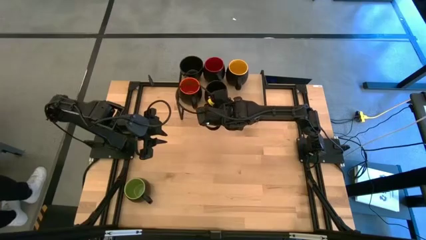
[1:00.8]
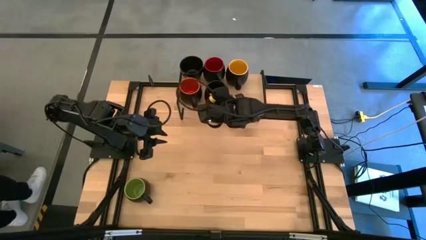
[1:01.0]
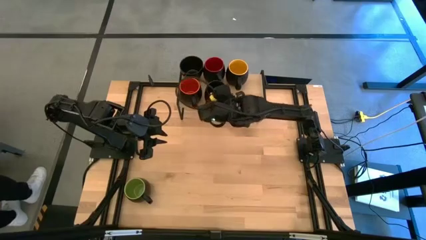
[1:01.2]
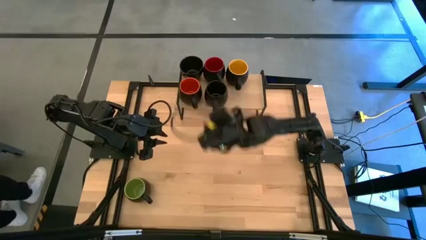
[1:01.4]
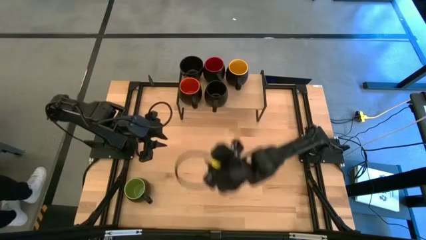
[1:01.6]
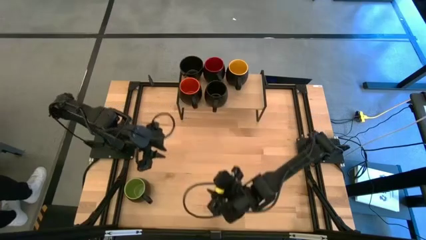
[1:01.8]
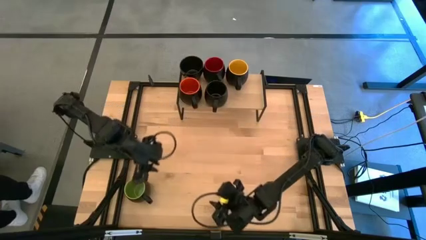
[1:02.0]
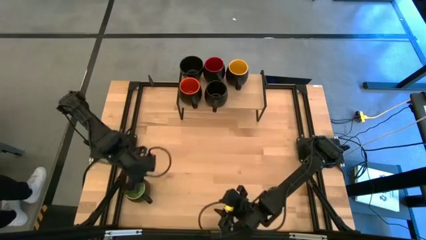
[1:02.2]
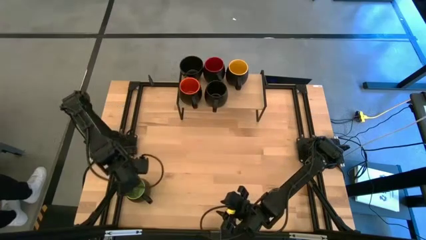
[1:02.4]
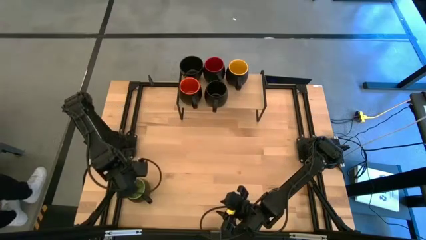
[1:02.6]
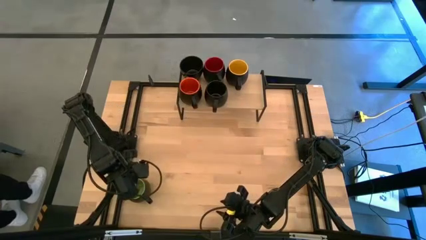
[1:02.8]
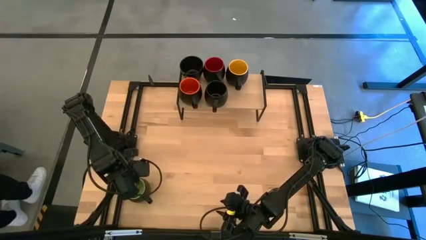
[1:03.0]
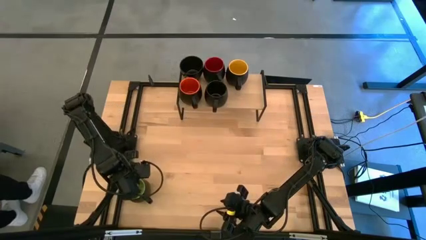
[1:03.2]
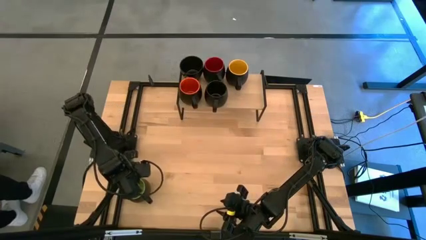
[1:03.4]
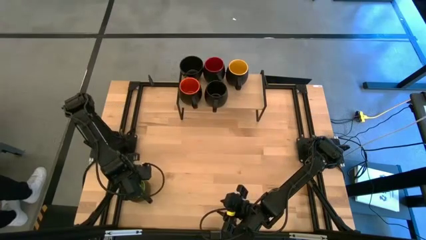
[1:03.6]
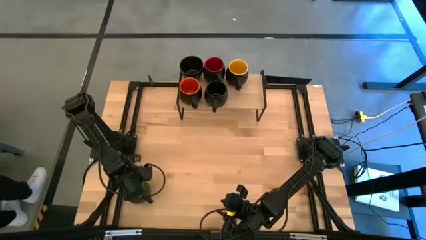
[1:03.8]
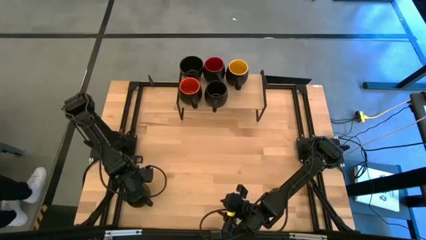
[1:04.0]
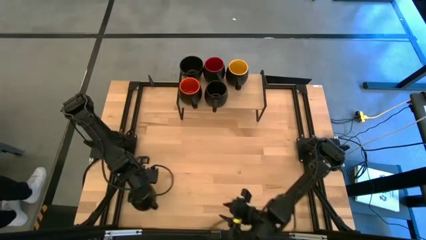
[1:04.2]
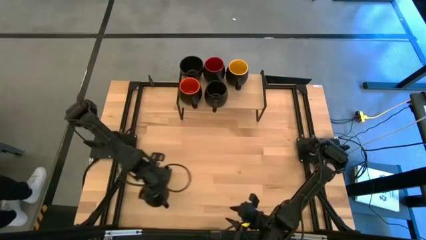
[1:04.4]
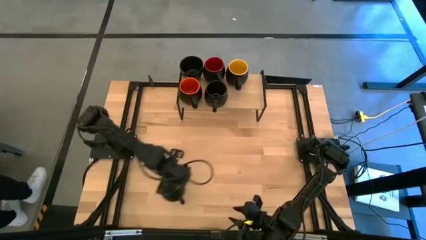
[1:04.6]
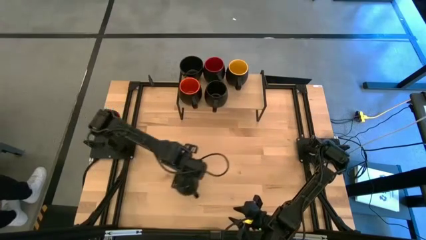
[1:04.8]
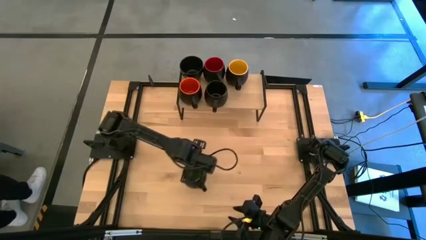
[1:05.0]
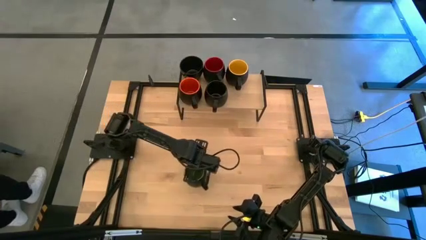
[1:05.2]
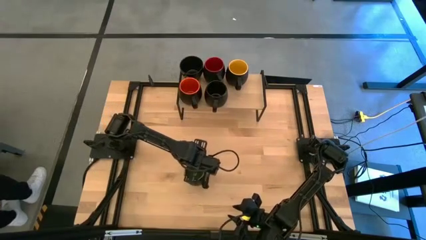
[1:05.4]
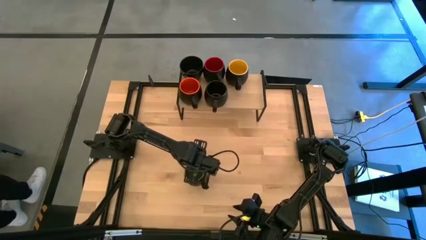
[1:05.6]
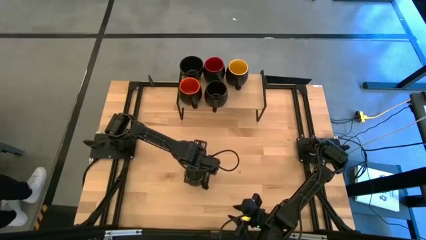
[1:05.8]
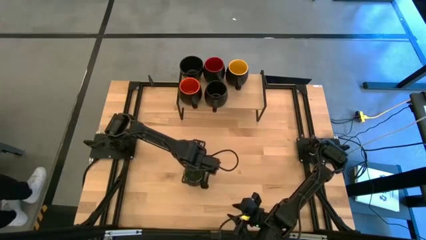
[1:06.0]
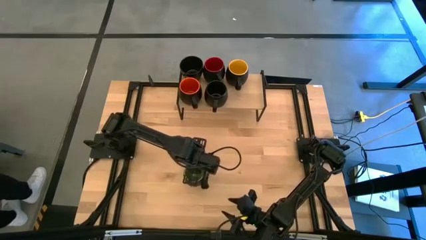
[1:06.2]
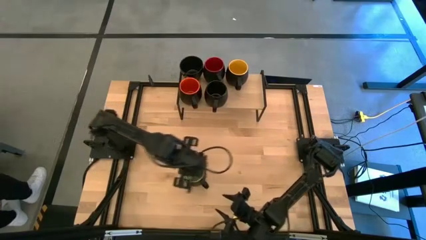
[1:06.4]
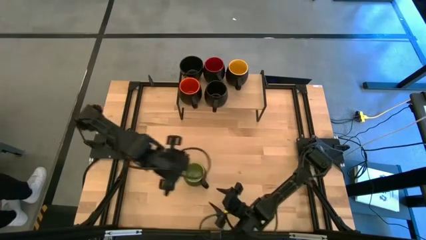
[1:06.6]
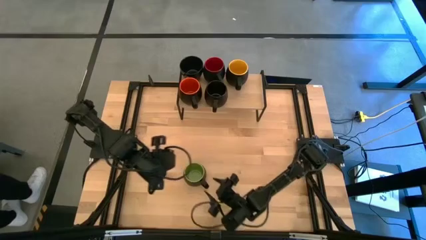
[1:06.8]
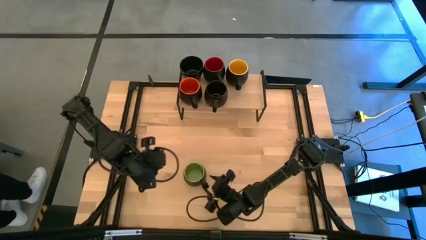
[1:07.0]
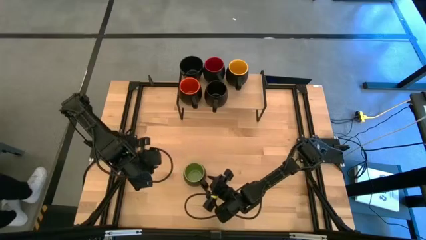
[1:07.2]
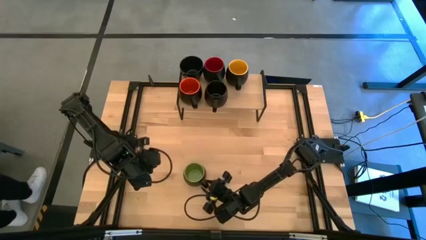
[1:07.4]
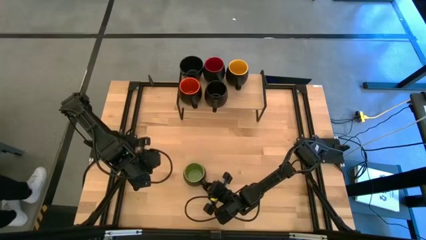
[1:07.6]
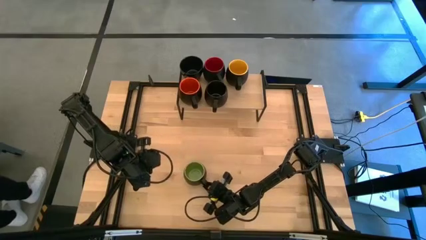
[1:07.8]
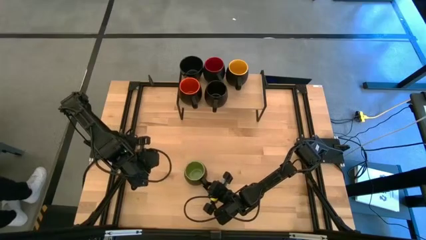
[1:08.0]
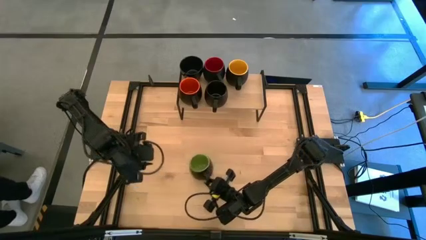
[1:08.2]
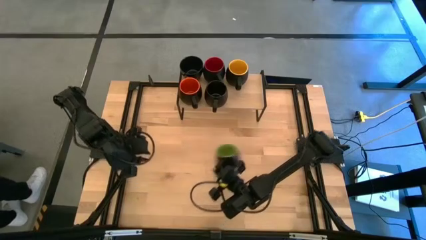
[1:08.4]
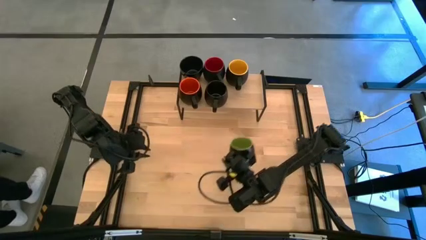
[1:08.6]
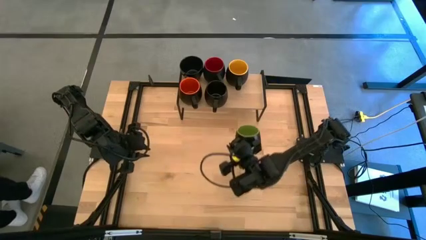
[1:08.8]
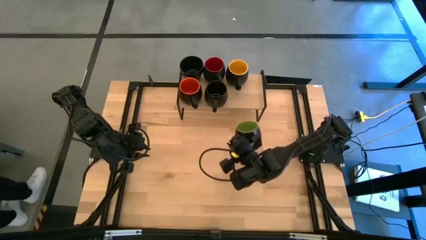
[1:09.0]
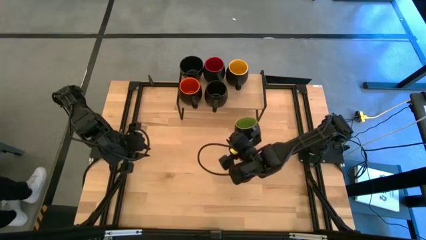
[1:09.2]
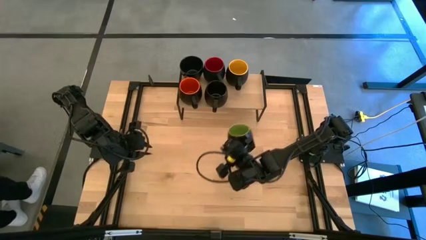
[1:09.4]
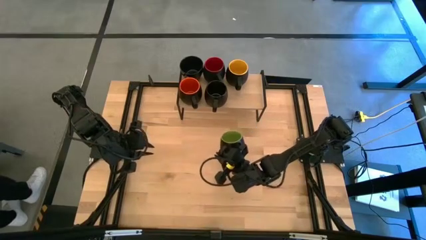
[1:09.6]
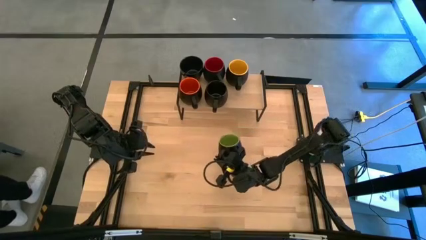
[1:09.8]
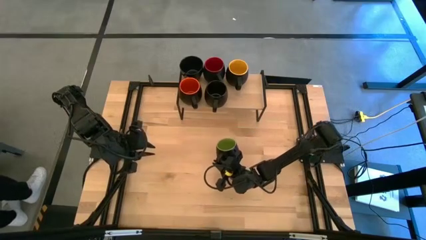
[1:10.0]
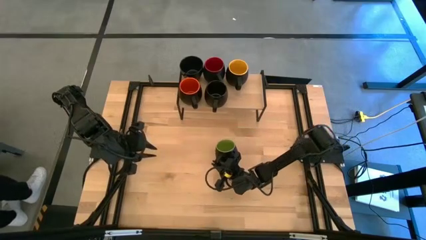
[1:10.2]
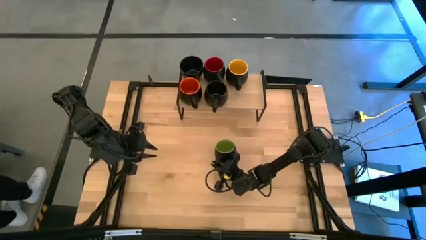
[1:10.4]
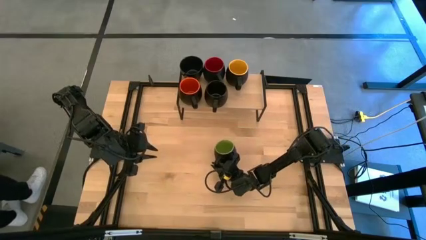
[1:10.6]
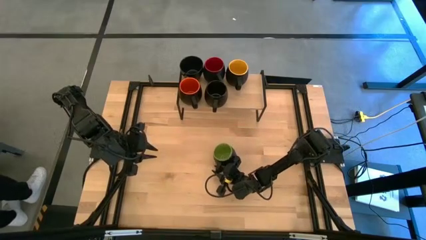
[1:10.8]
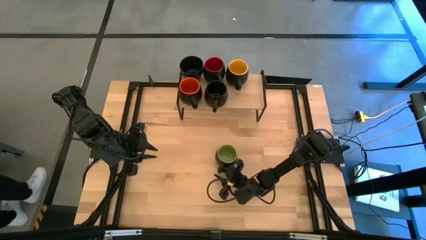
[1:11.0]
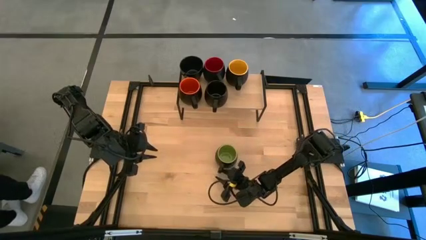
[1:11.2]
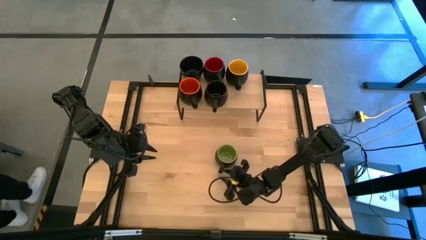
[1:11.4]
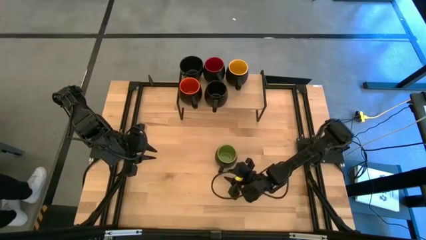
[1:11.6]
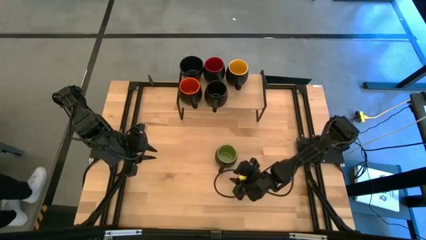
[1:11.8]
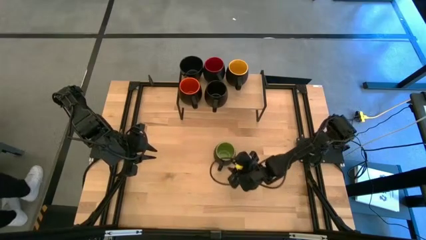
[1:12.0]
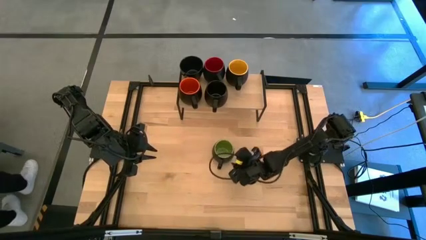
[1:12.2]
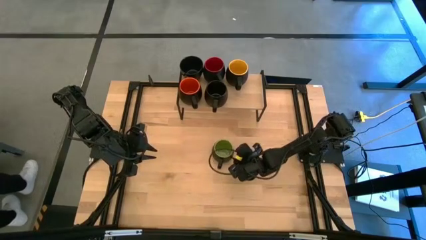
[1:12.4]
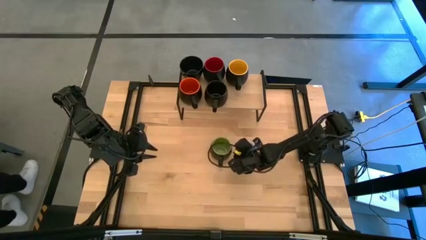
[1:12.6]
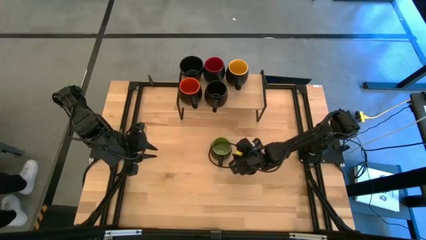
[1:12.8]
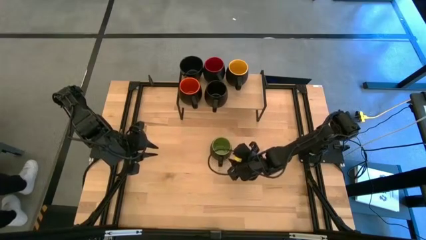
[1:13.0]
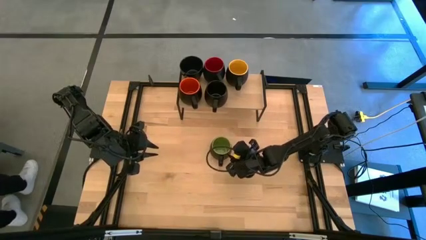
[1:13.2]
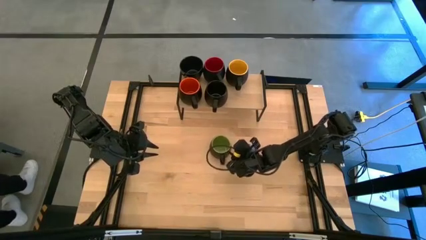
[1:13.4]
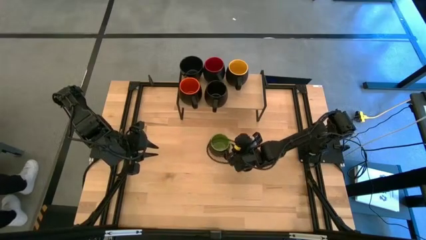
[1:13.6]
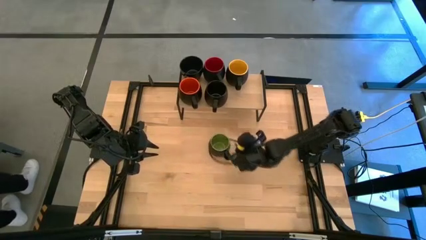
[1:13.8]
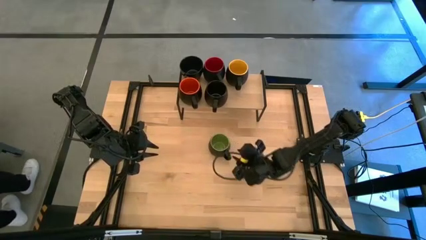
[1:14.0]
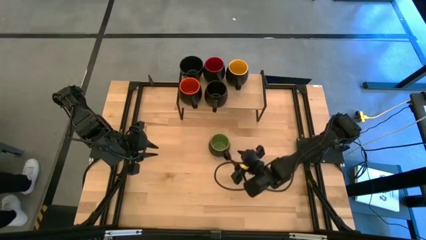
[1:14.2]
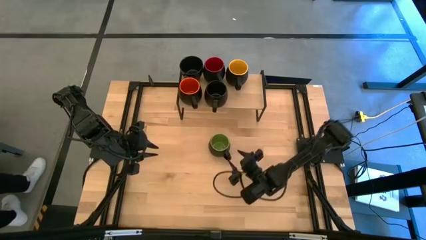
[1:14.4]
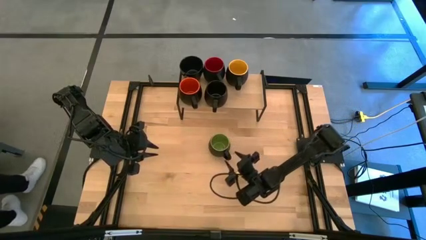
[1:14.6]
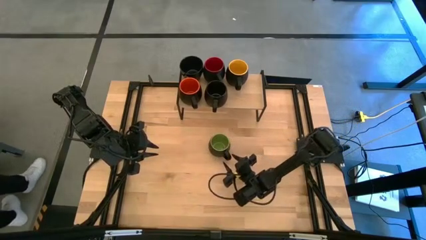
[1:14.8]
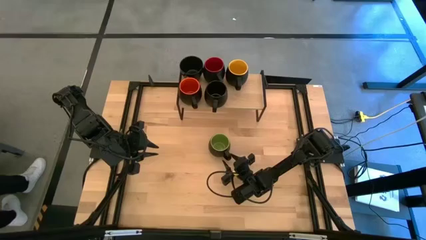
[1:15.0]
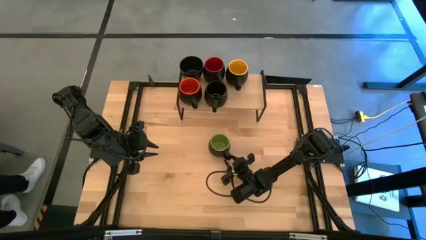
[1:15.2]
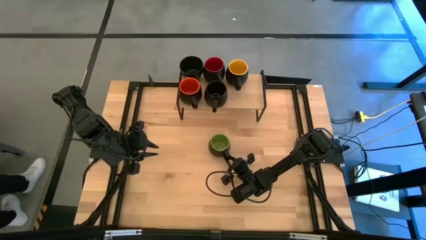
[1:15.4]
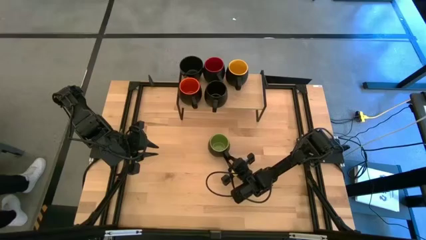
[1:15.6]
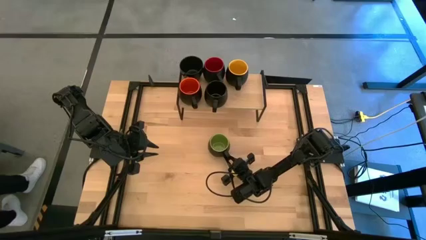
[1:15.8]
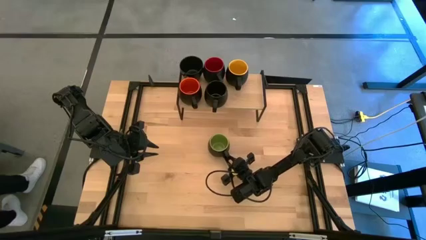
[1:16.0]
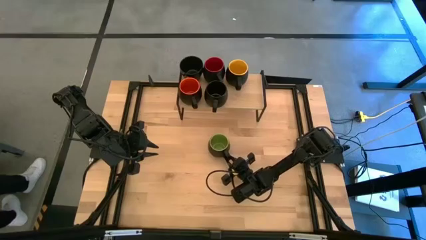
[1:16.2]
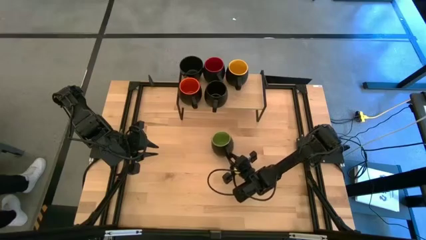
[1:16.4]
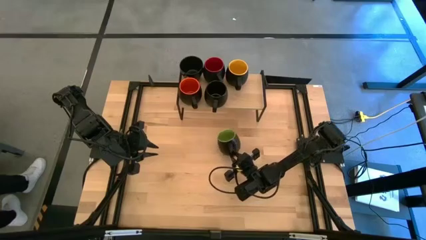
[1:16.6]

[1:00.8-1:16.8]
Task: Place coffee mugs
Put the green mug on the shelf
